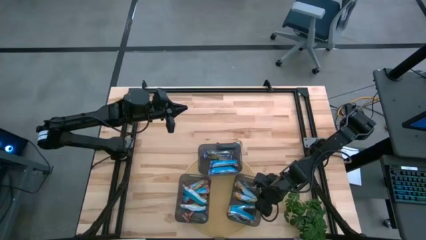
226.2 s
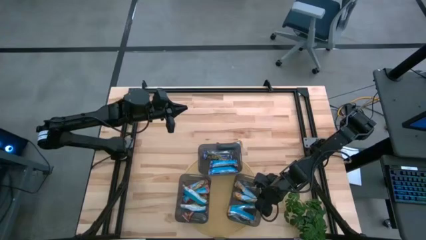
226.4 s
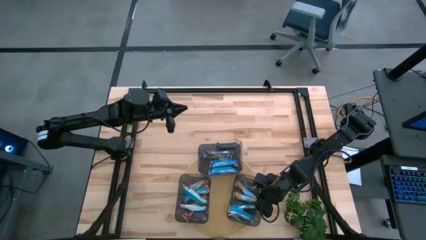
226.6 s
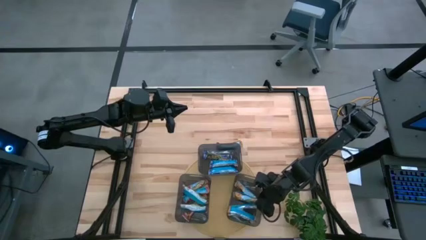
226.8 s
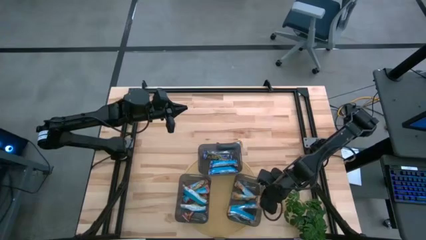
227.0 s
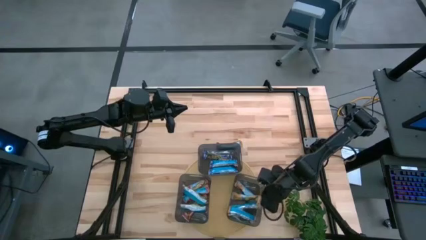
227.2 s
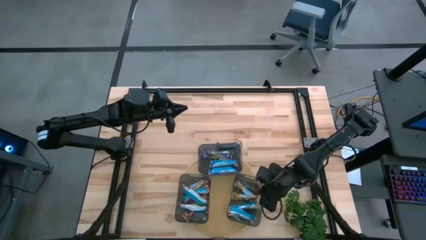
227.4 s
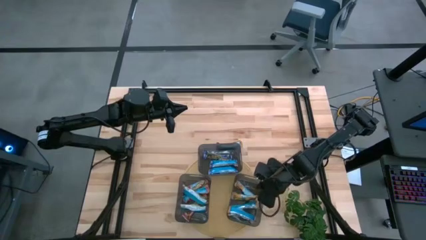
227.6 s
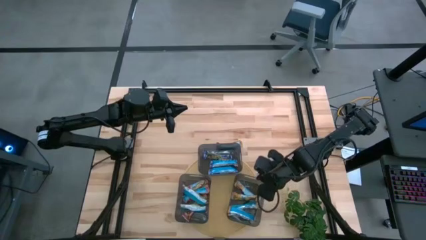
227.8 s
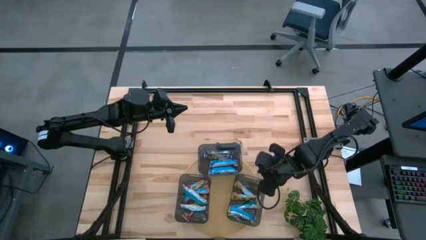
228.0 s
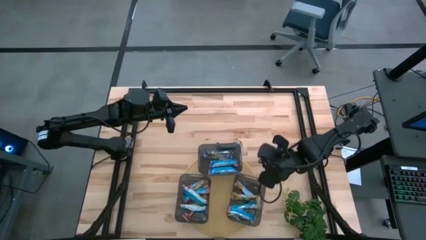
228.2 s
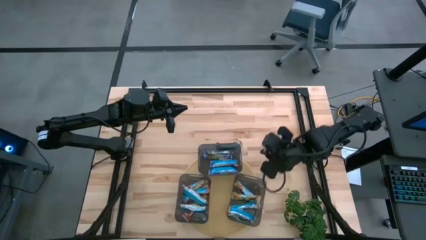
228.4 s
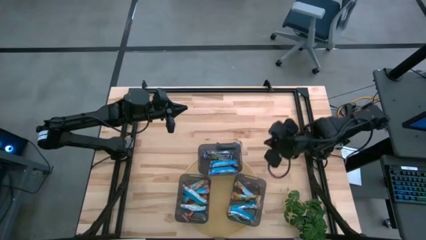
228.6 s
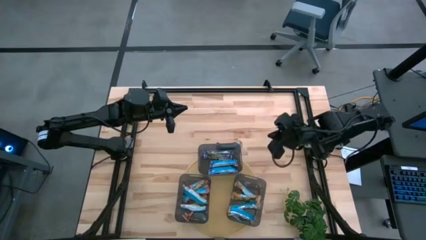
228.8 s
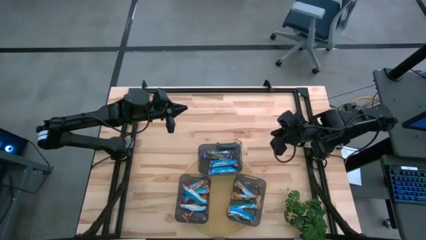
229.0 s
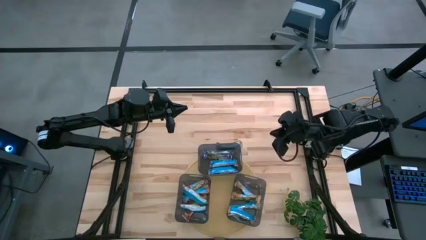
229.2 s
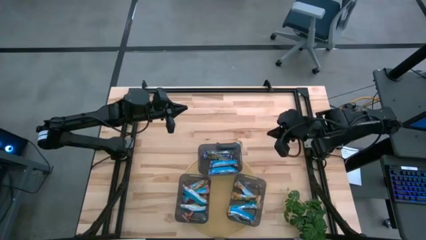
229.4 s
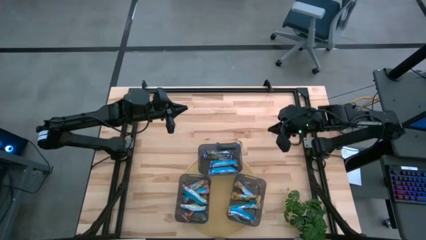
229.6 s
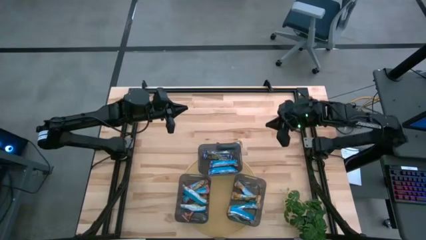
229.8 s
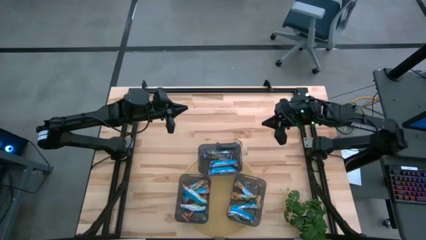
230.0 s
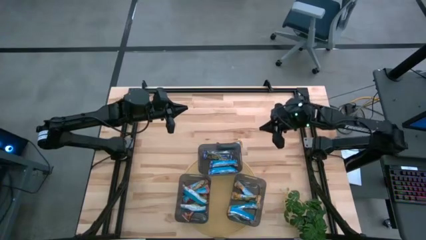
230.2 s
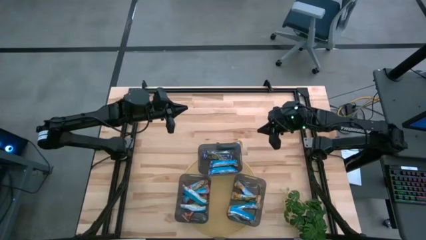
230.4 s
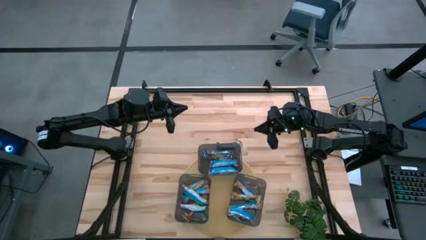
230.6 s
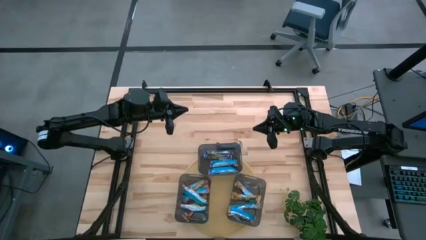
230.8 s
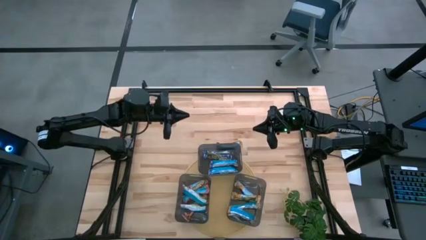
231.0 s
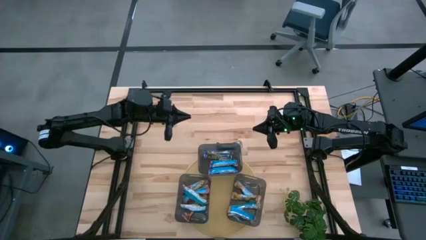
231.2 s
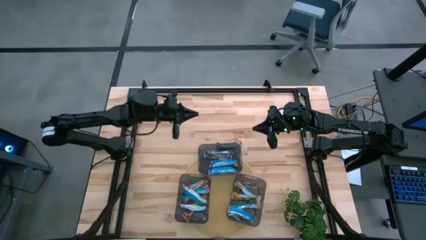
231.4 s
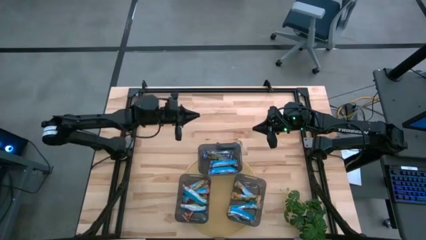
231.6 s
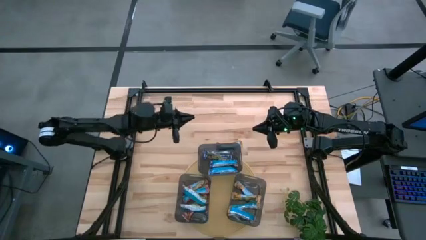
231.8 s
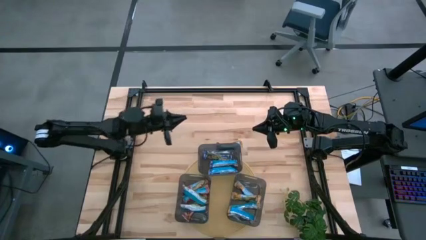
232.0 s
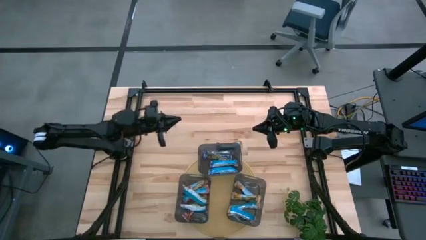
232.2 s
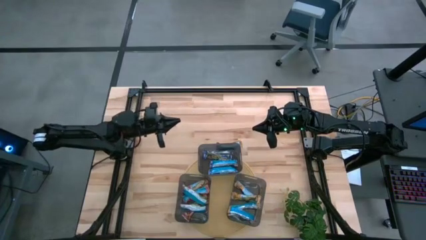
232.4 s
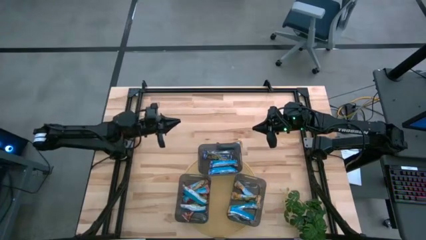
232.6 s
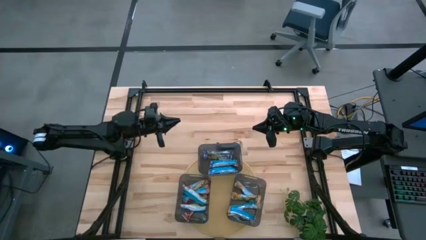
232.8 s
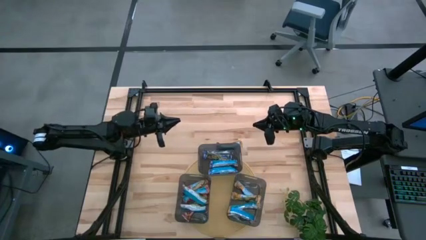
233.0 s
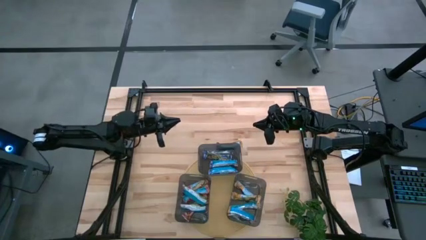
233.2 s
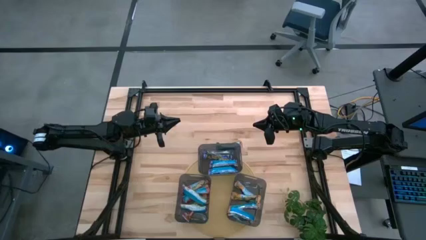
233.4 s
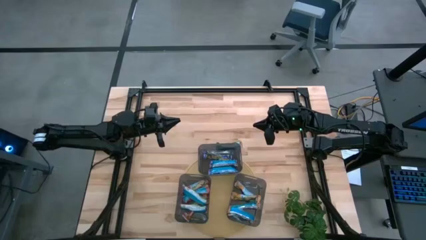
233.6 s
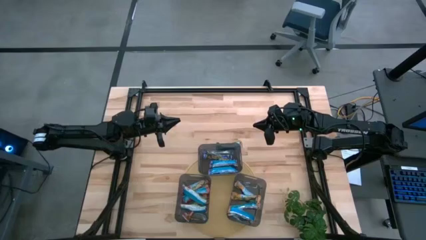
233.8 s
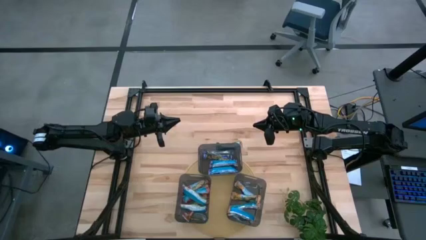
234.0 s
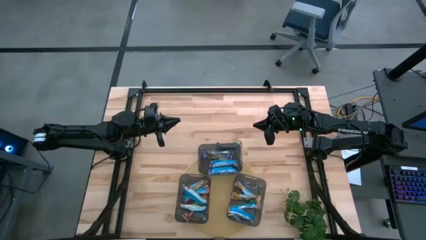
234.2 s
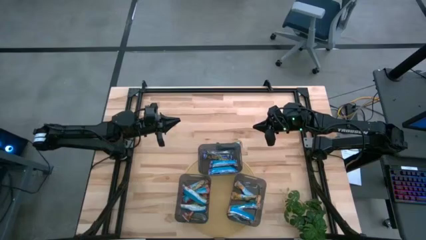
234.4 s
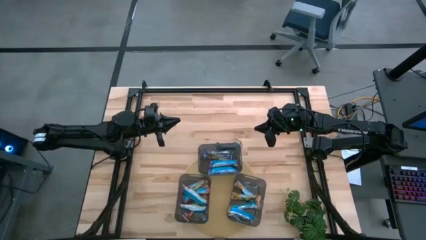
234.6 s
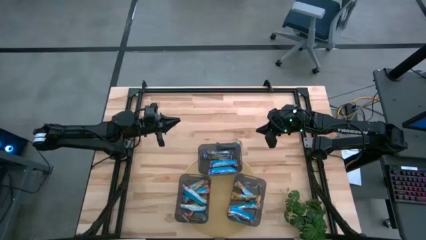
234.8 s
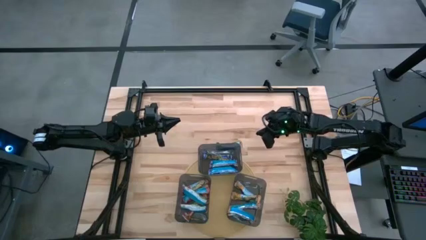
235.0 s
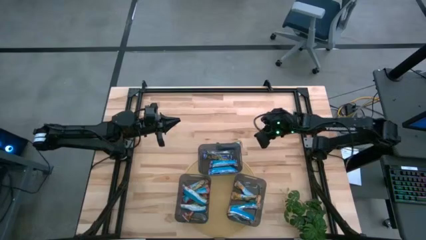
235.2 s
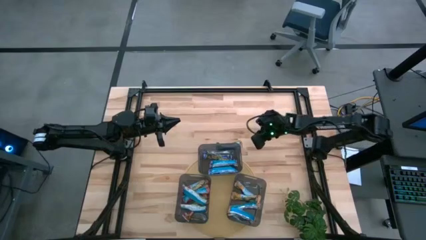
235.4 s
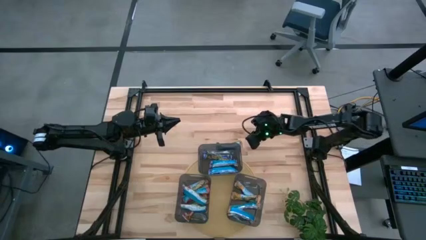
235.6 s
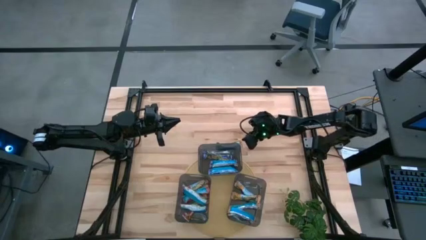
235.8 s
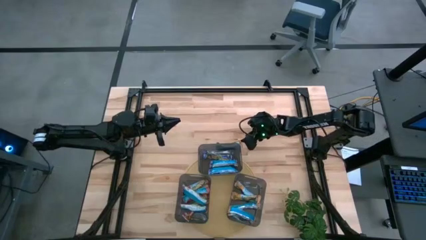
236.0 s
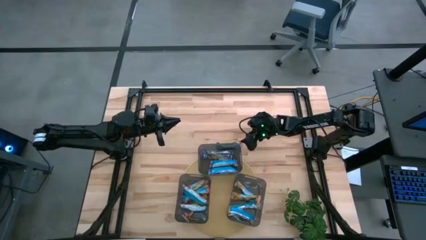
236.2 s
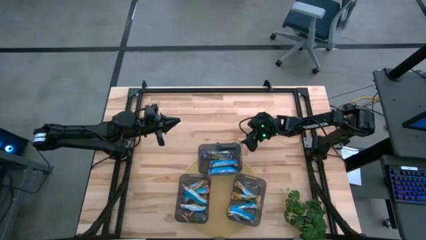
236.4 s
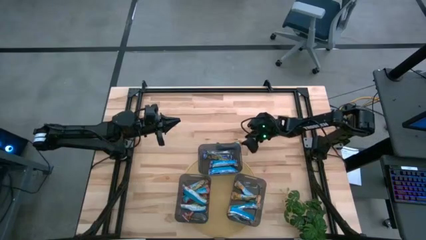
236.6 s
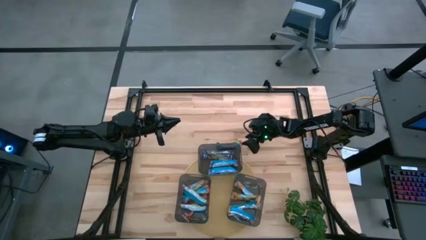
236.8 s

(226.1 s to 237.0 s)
Task: Pick and place Granola Bars by type
Put the yellow granola bar into the bottom right black bin

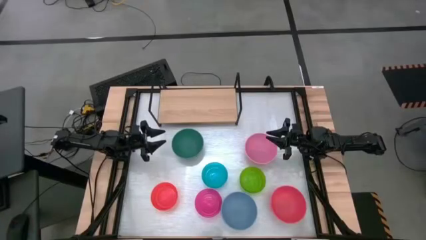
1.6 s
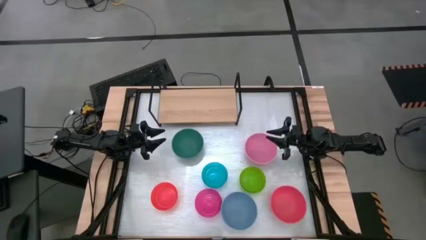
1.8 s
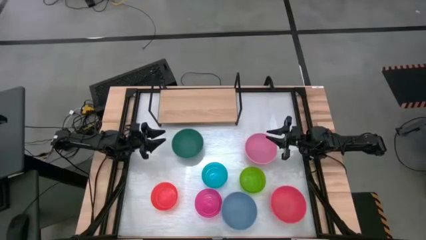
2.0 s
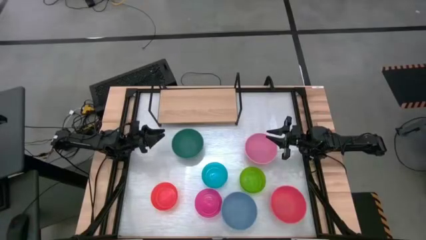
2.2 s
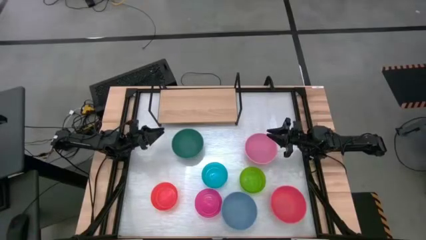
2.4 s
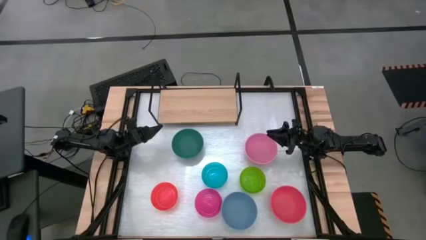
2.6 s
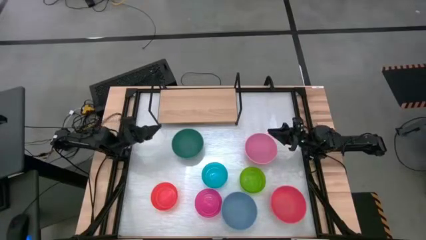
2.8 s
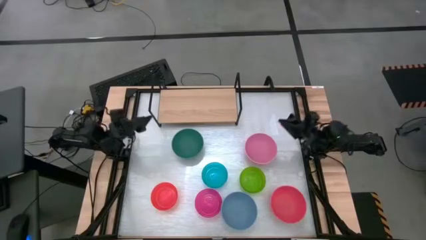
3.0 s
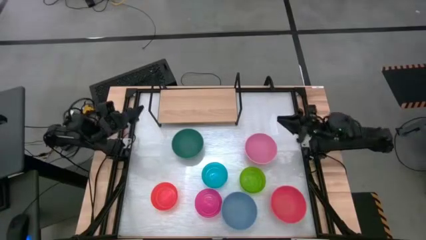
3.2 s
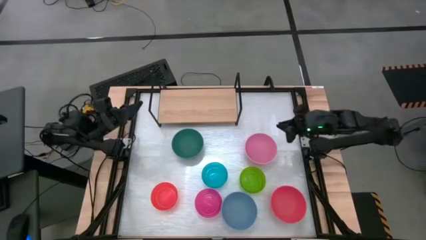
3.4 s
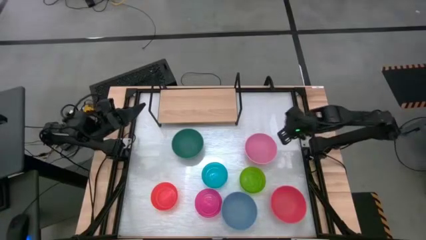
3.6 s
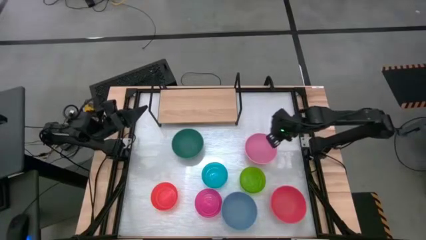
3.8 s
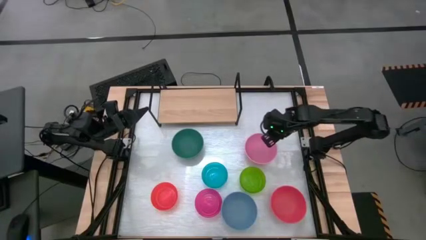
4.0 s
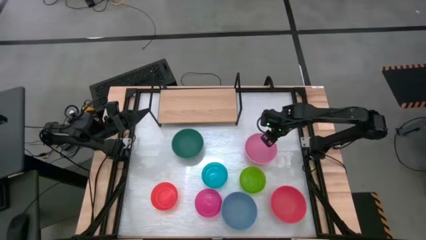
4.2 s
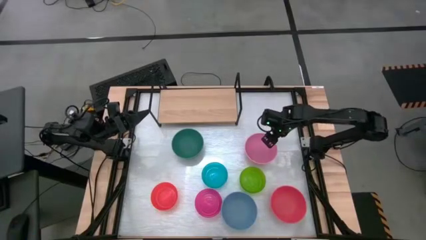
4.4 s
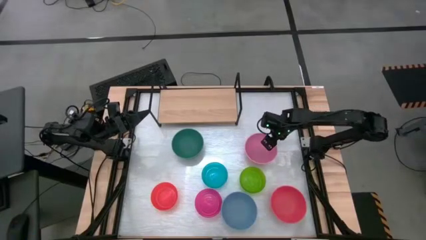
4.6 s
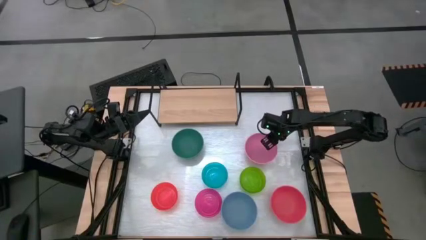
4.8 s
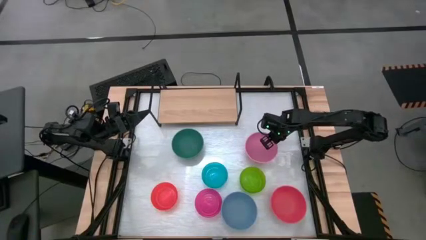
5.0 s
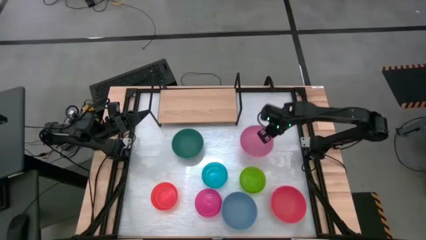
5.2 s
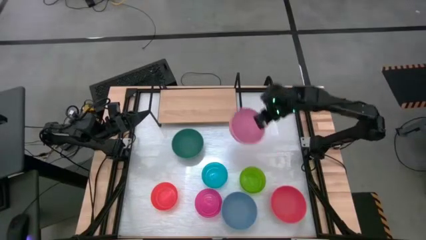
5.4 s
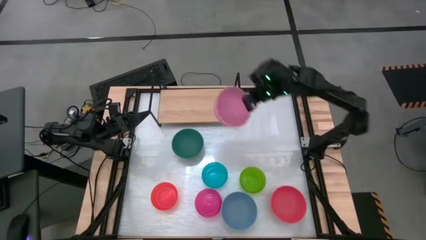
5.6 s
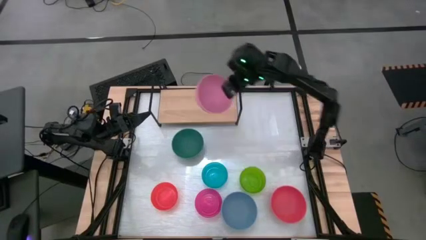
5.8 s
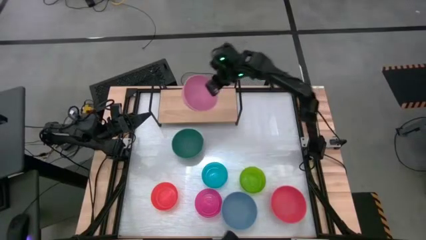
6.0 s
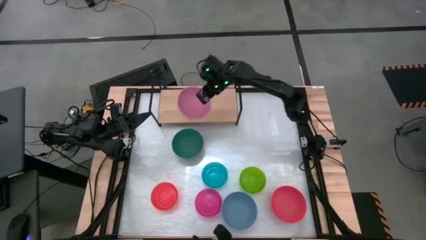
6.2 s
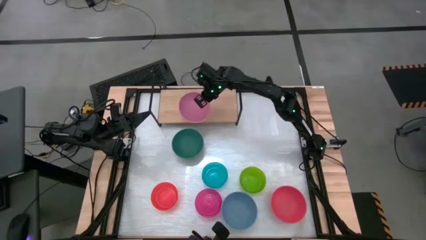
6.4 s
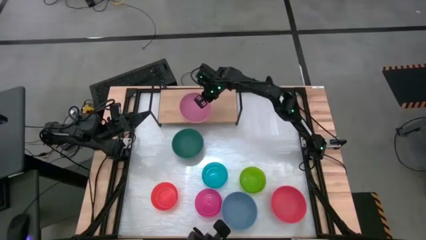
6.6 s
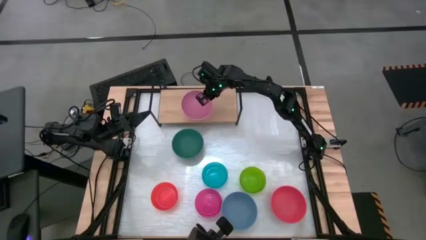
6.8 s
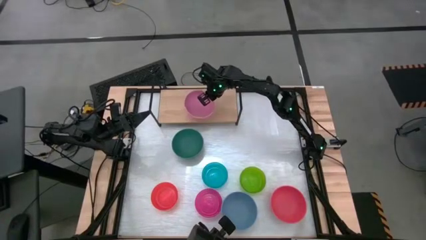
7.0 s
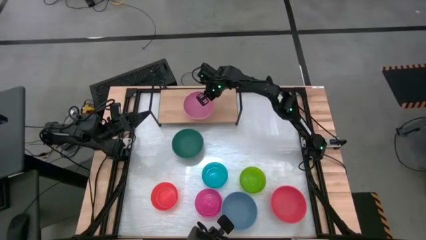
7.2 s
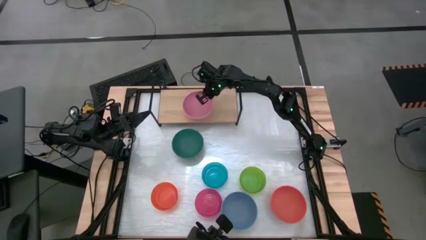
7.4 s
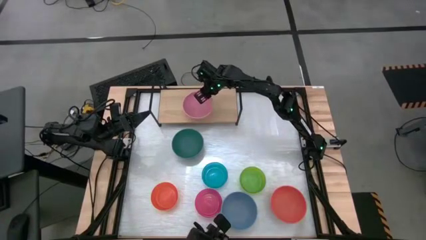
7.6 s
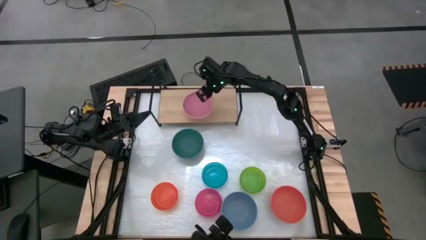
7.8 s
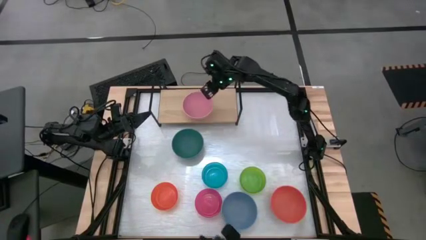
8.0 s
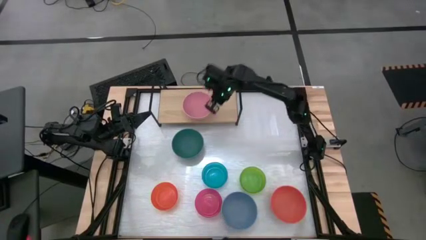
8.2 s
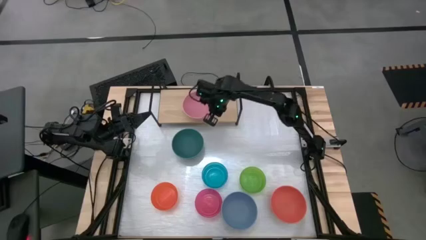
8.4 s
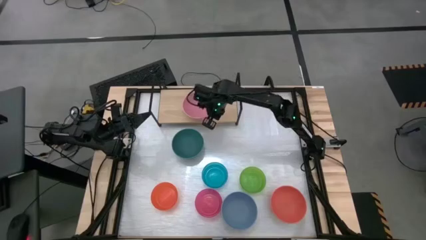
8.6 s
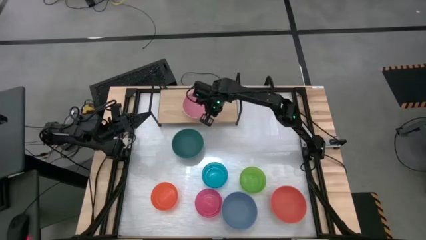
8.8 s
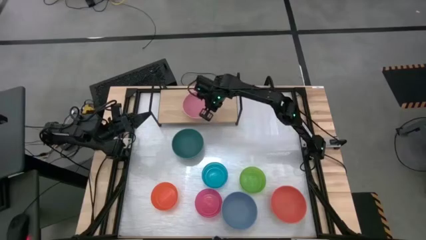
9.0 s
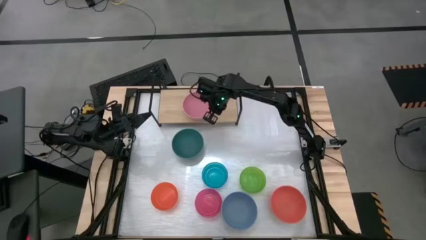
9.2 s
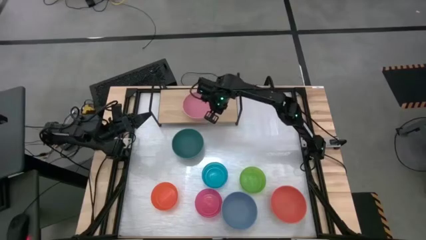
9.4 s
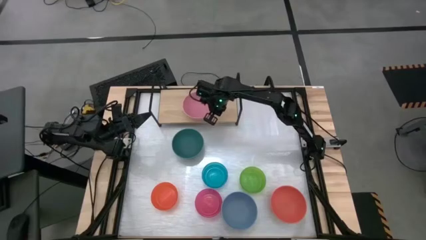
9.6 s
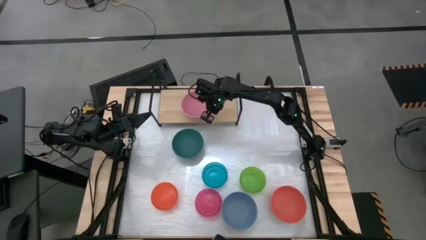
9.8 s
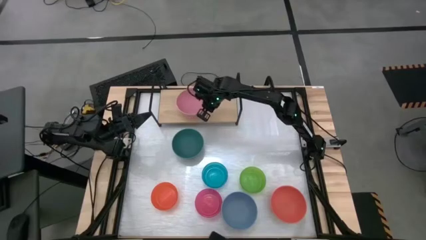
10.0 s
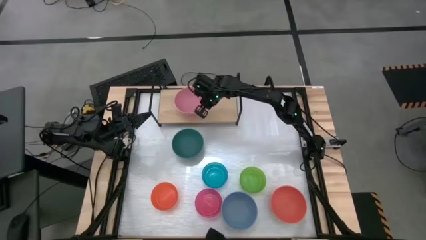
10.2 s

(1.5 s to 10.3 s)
Task: Place and stack bowls onto a shelf
Put the pink bowl on the shelf
